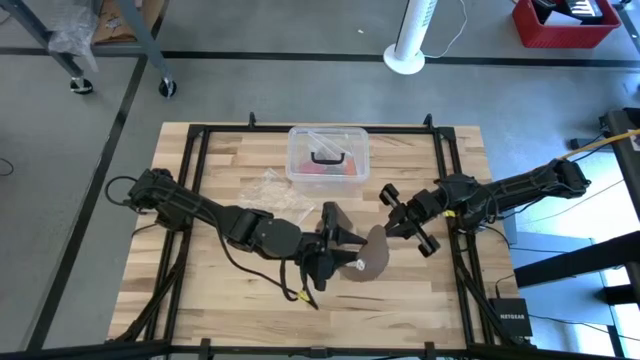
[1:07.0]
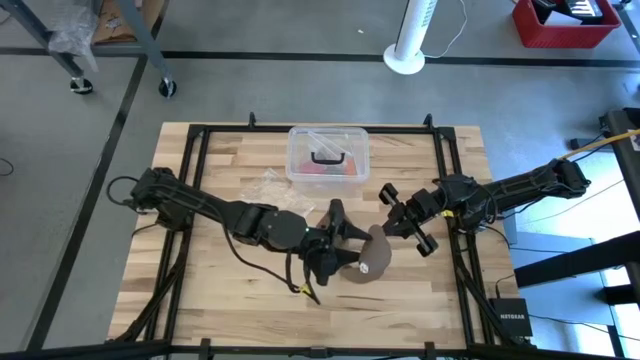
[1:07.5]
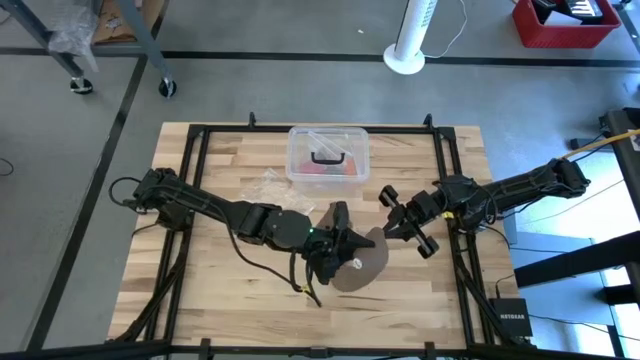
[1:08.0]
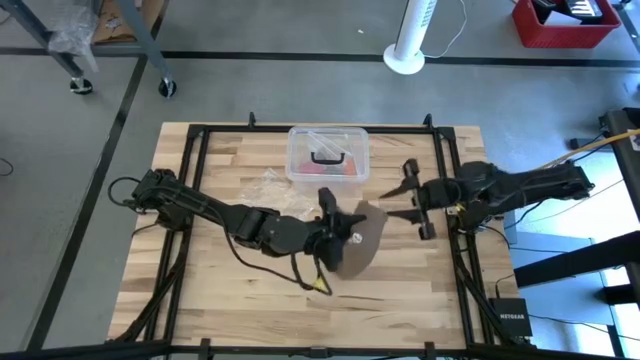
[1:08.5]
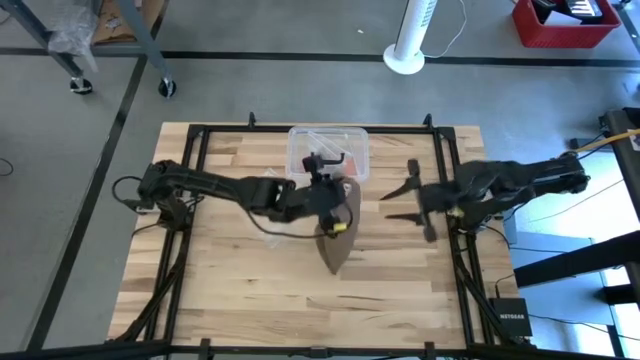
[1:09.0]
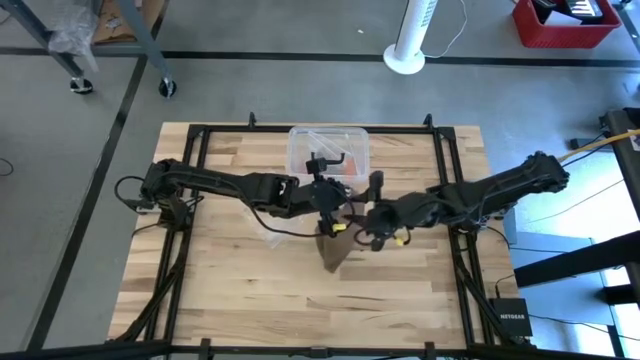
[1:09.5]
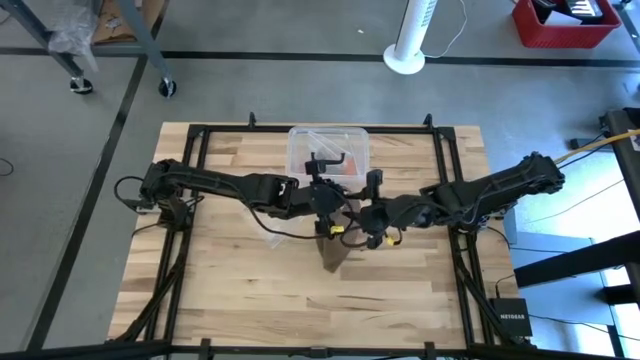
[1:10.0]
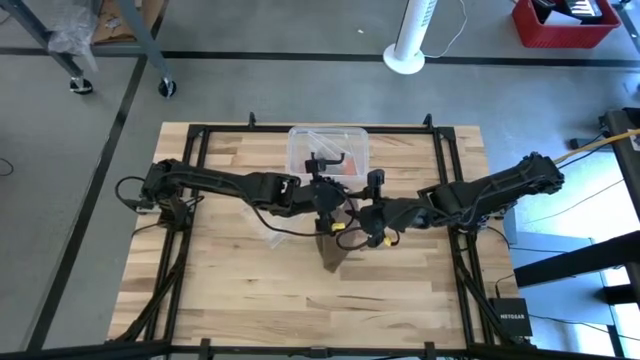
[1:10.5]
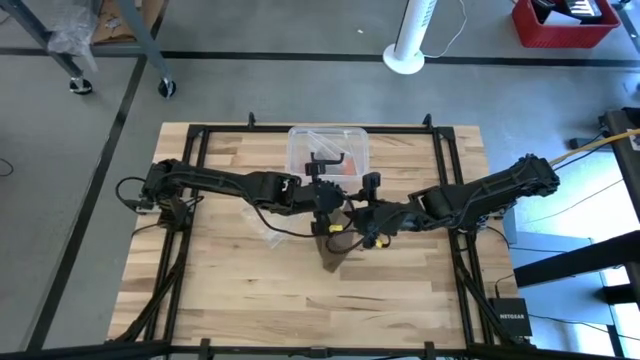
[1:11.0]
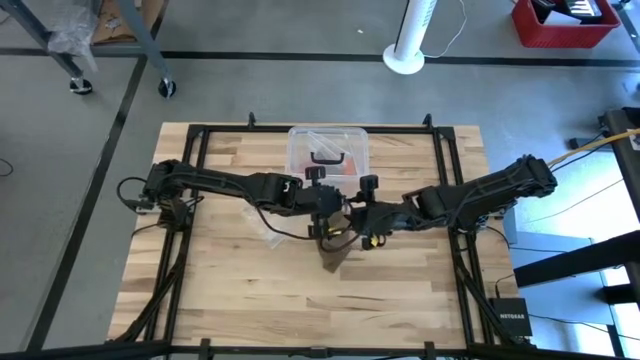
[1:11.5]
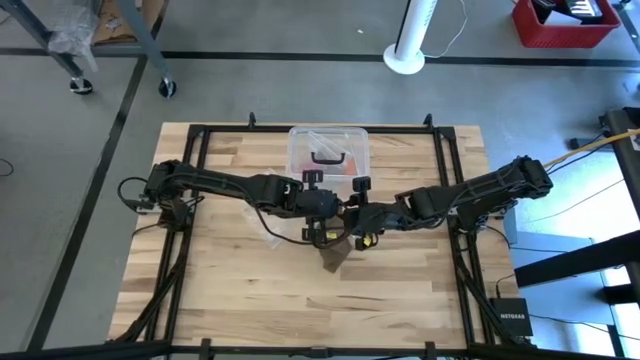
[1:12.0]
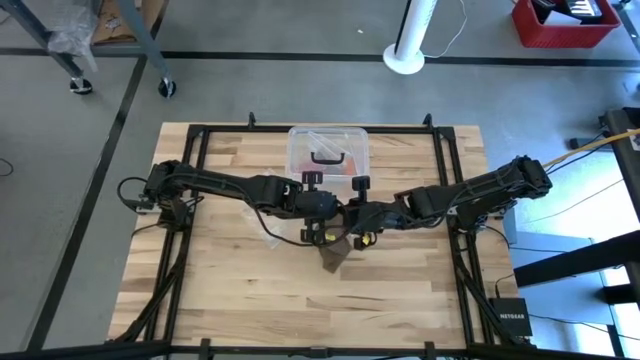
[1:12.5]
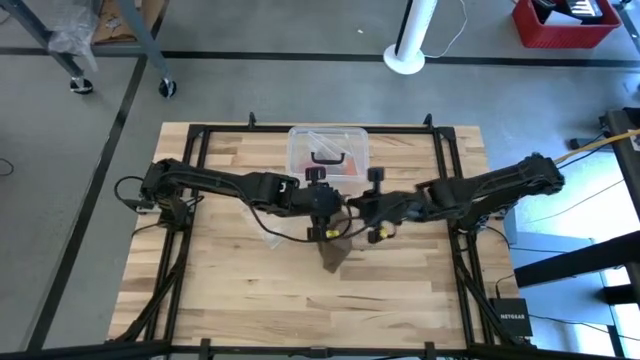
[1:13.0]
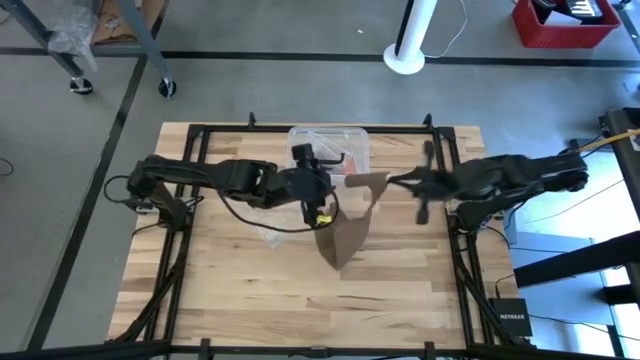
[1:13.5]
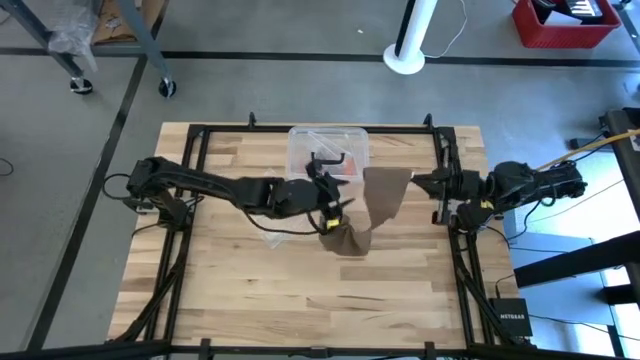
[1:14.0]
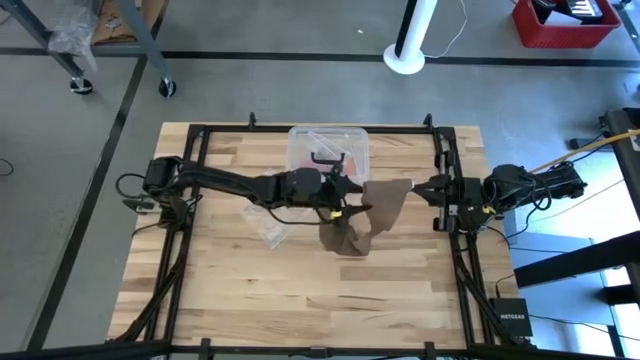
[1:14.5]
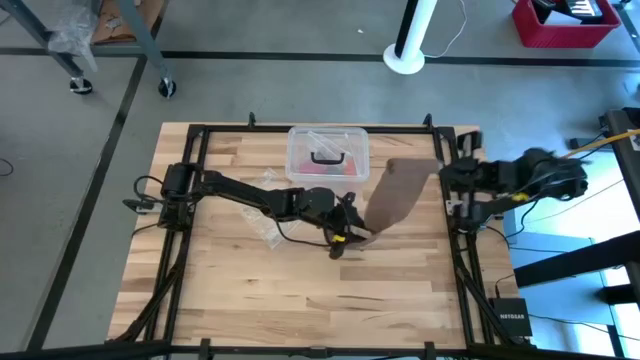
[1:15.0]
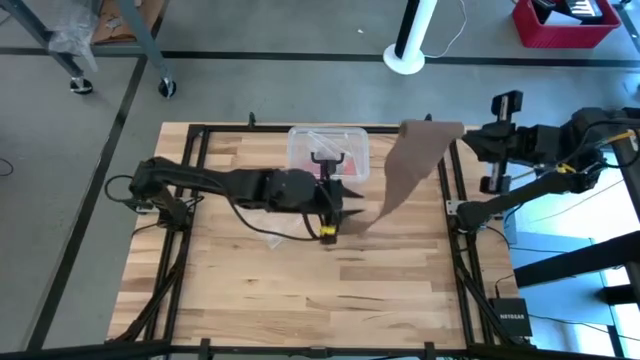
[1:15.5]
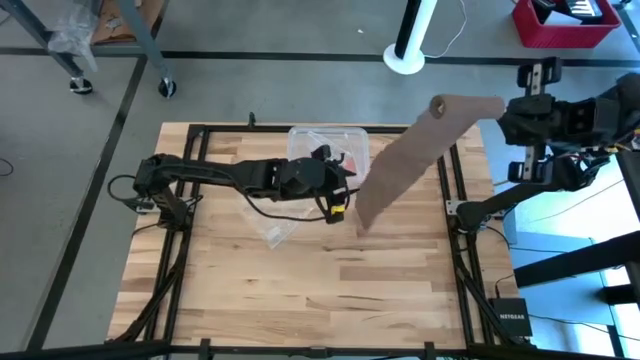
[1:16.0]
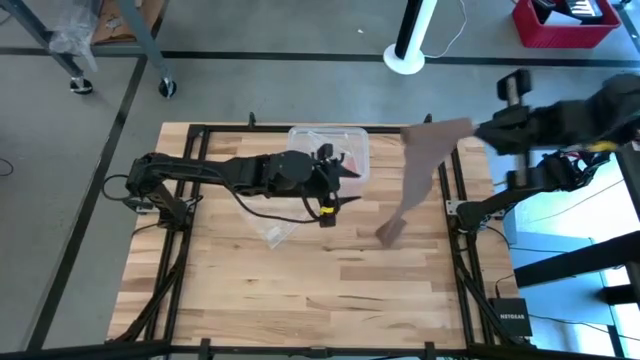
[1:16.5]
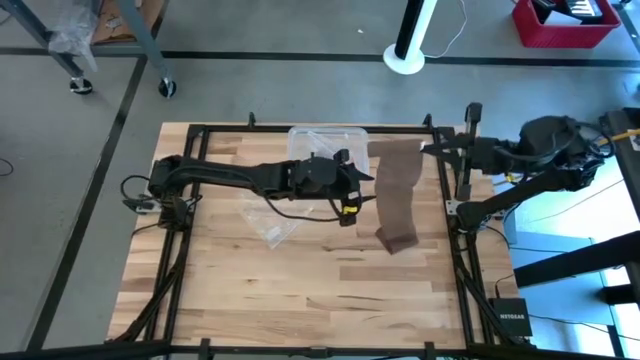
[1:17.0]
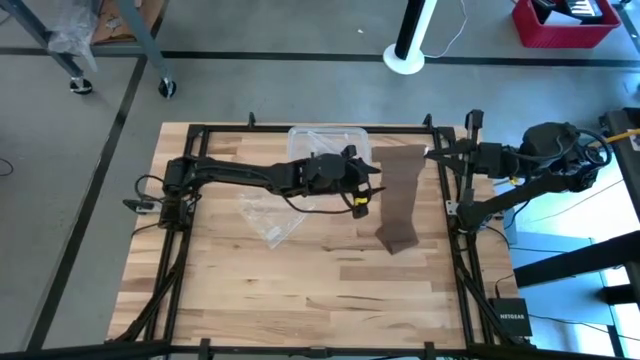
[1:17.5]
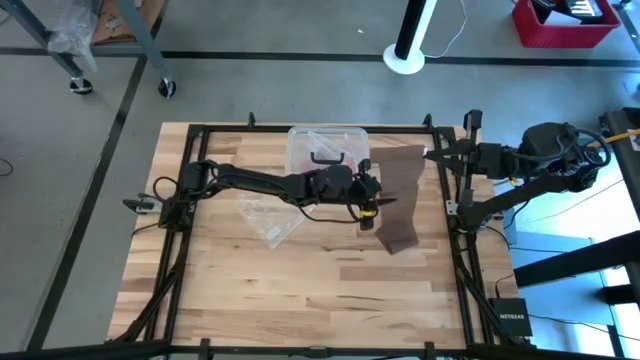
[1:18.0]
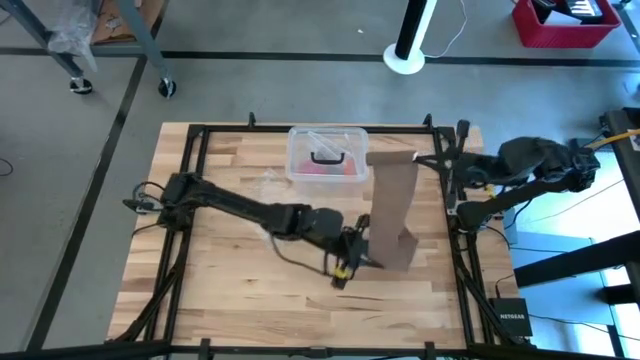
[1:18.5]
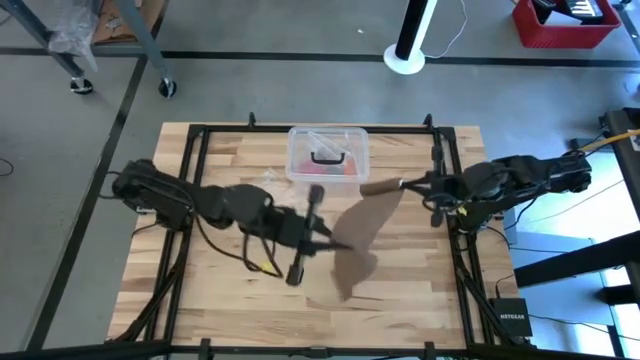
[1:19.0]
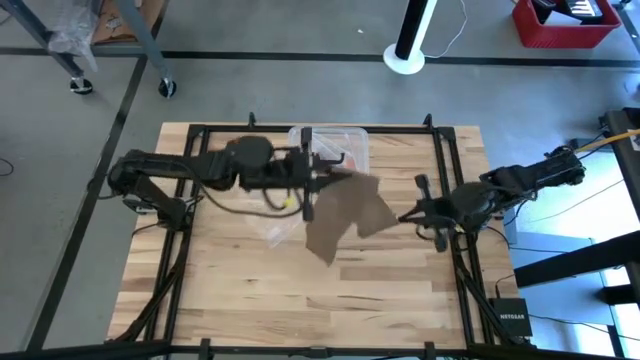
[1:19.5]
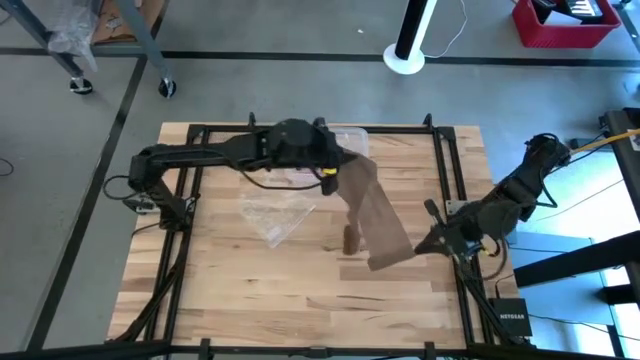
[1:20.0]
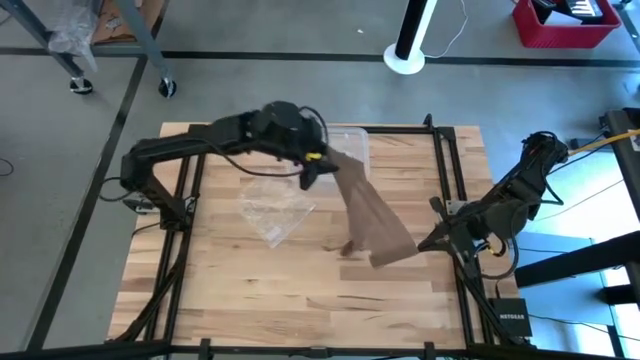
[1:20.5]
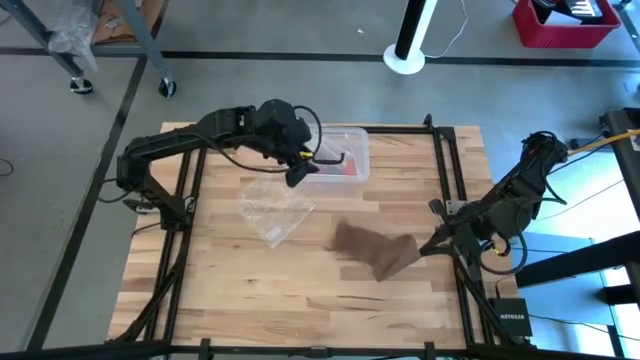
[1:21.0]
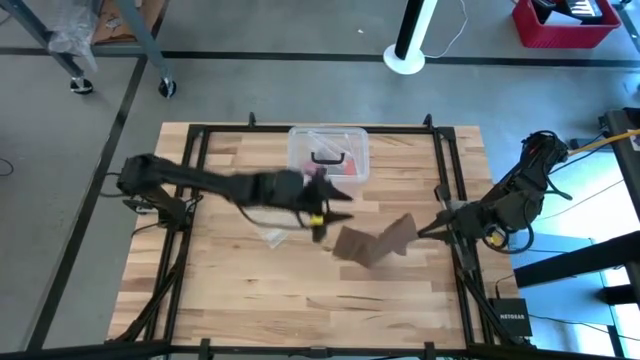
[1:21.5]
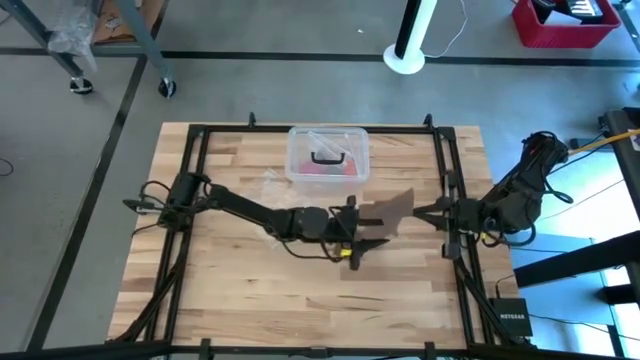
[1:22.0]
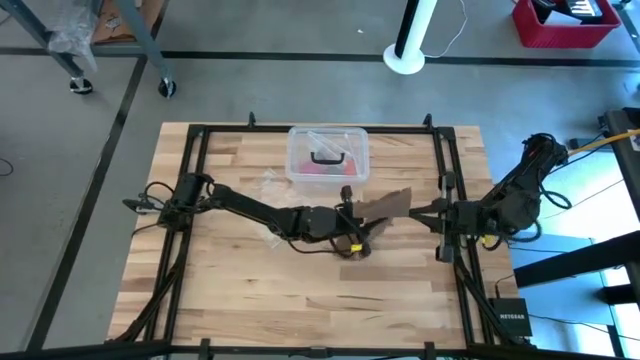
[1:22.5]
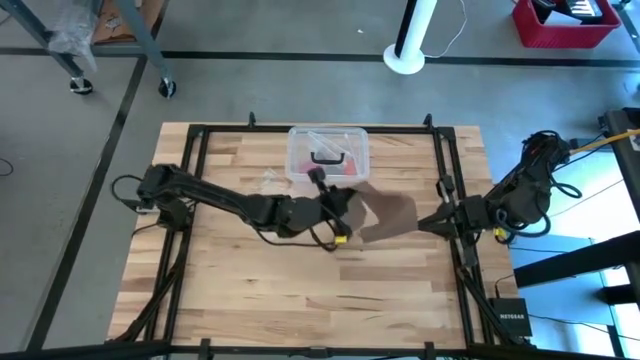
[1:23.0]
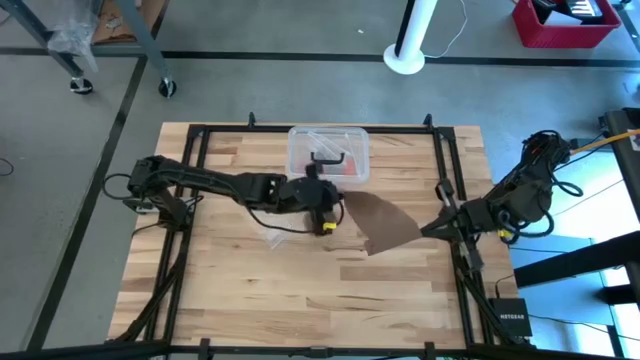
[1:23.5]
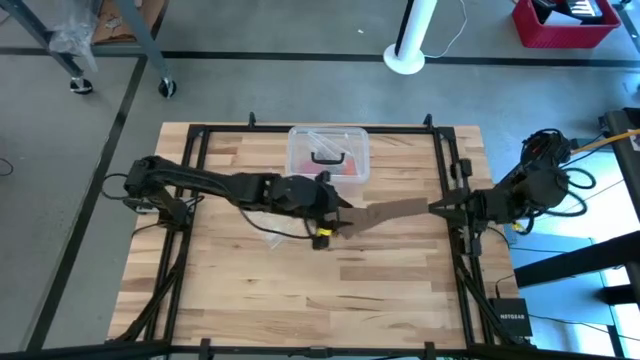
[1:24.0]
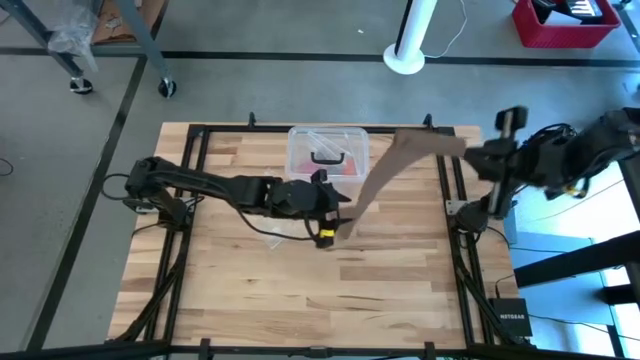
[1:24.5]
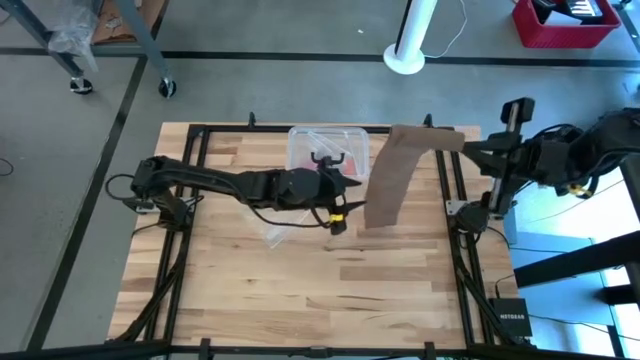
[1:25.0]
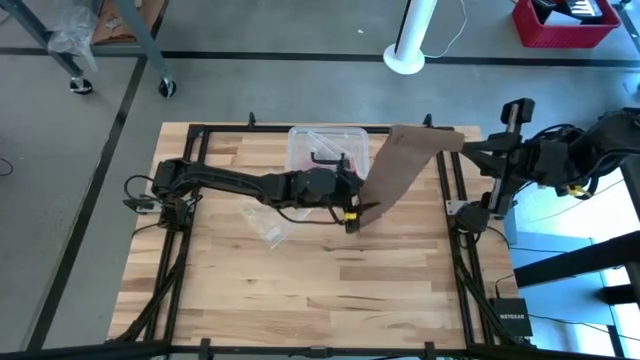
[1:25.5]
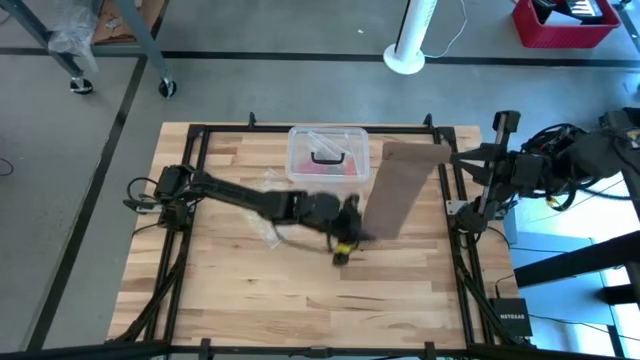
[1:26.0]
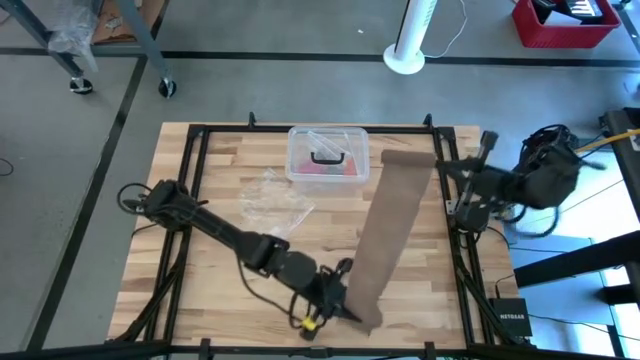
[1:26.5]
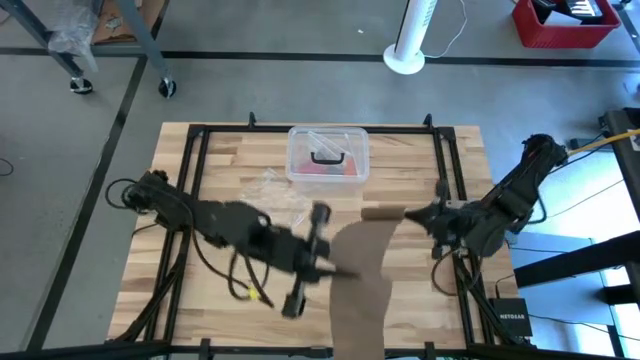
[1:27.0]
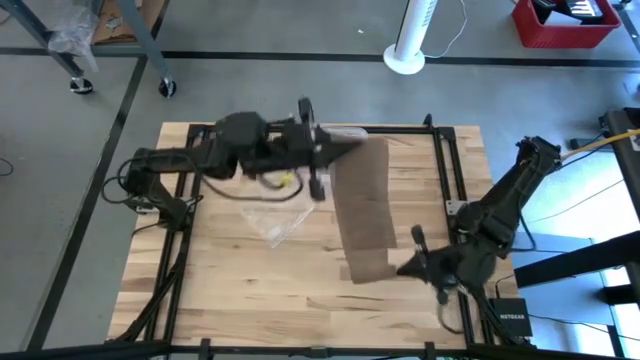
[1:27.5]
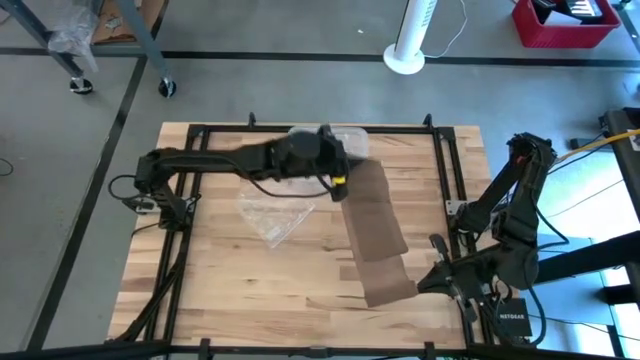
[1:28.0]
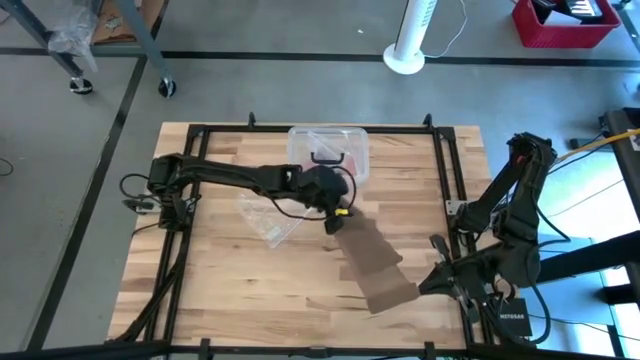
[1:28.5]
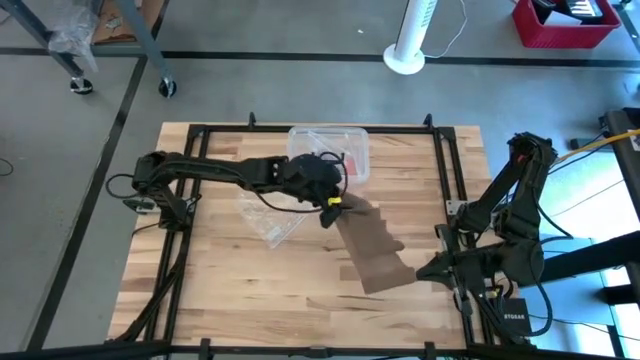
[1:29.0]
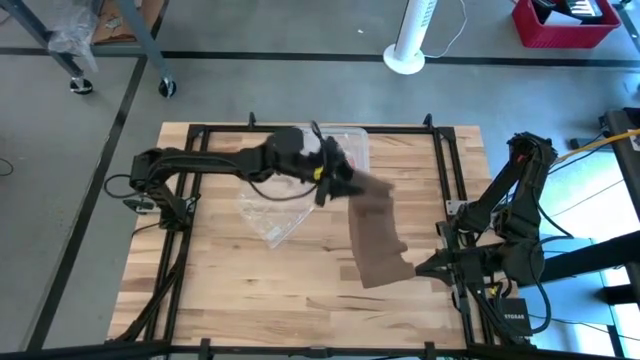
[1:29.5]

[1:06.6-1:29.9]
Task: Roll bandage
Roll the brown bandage
